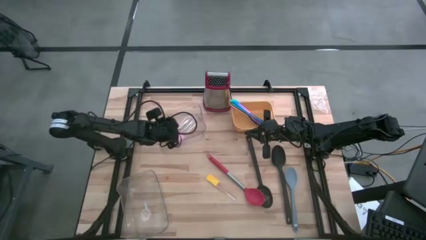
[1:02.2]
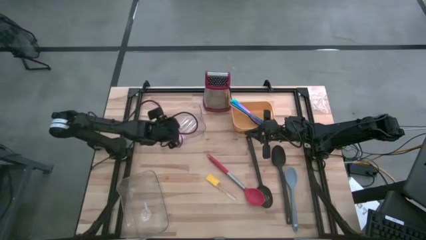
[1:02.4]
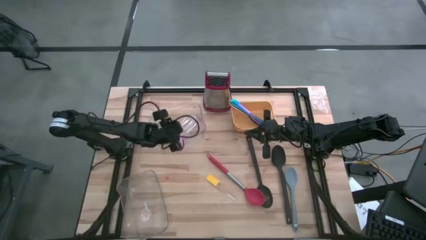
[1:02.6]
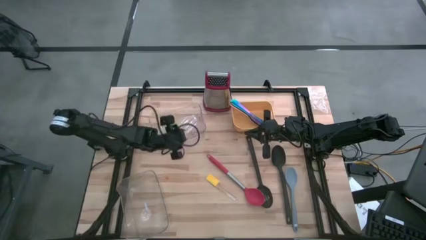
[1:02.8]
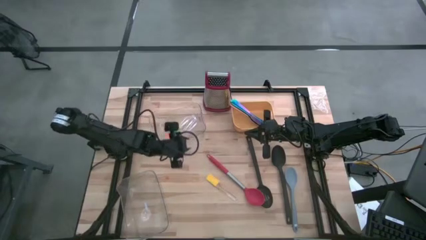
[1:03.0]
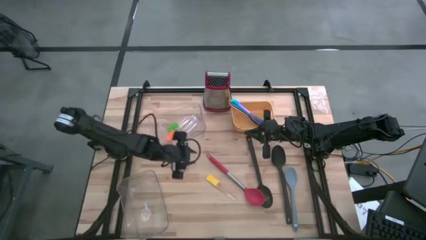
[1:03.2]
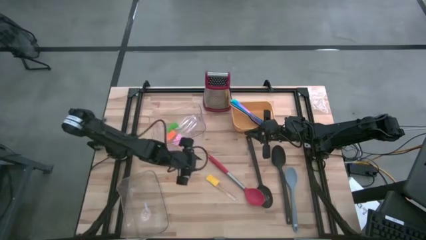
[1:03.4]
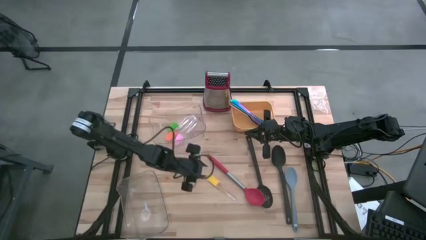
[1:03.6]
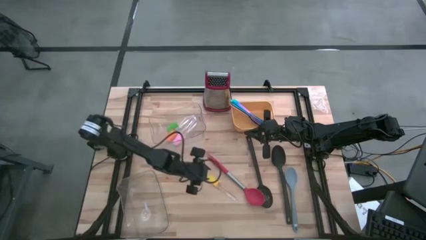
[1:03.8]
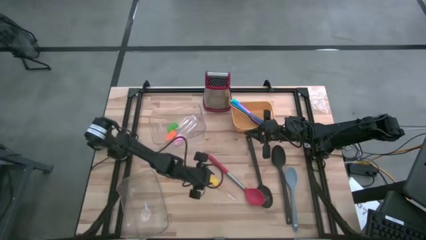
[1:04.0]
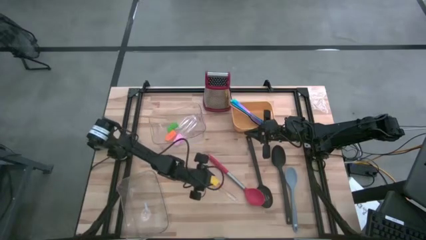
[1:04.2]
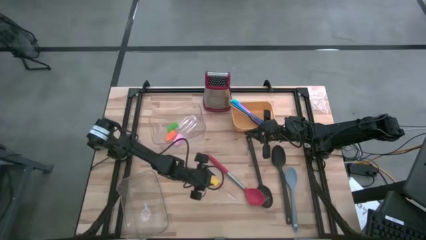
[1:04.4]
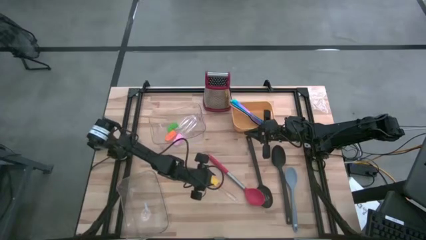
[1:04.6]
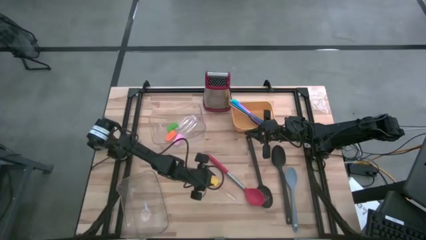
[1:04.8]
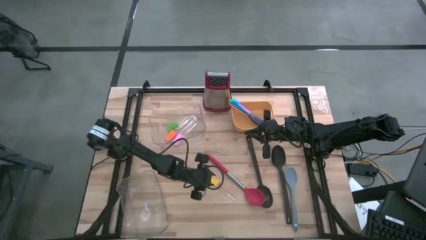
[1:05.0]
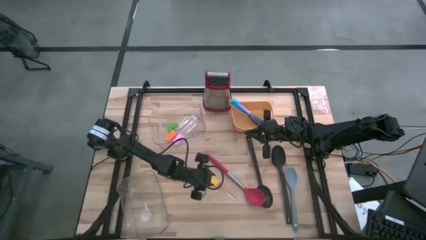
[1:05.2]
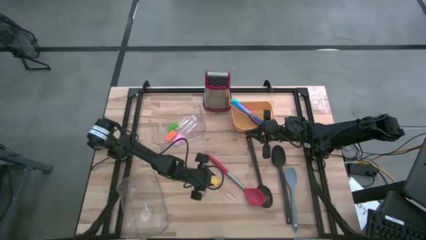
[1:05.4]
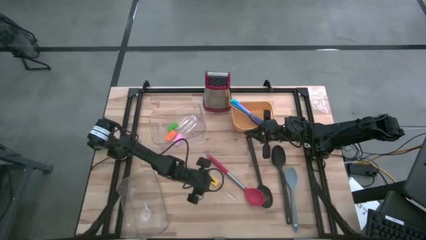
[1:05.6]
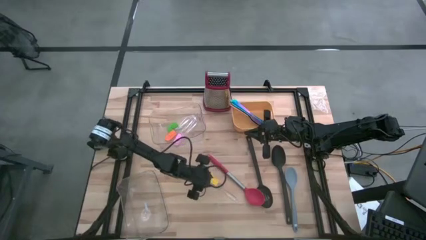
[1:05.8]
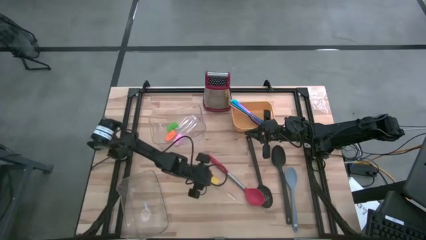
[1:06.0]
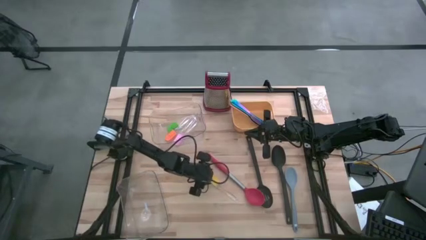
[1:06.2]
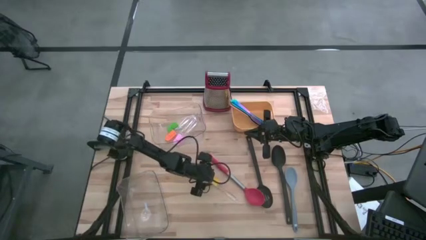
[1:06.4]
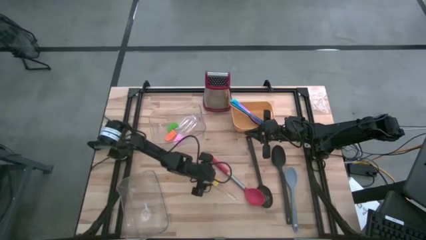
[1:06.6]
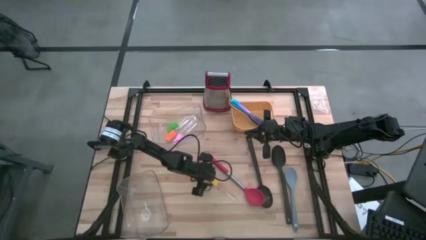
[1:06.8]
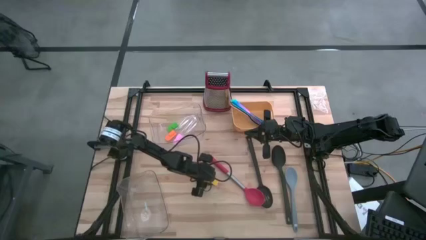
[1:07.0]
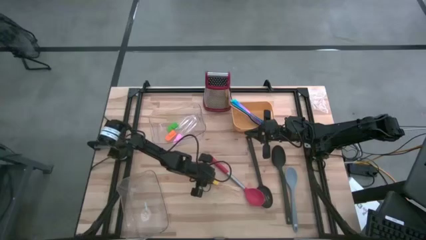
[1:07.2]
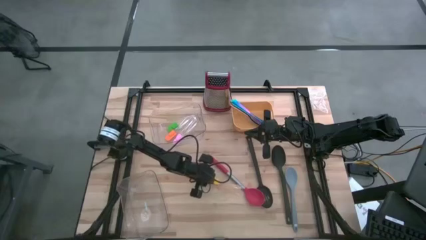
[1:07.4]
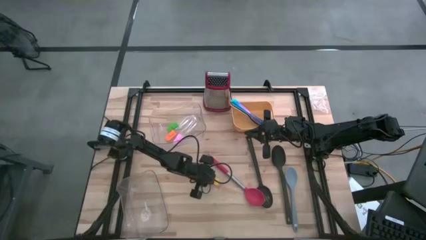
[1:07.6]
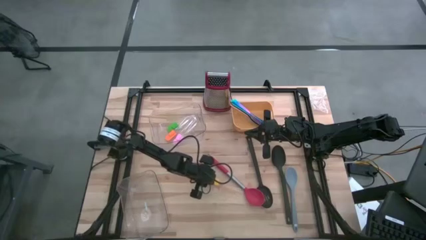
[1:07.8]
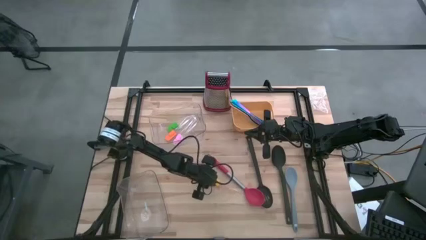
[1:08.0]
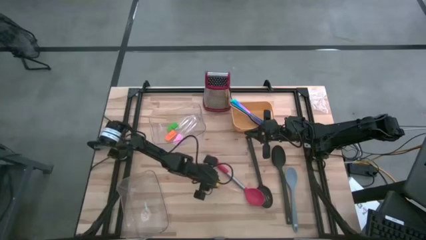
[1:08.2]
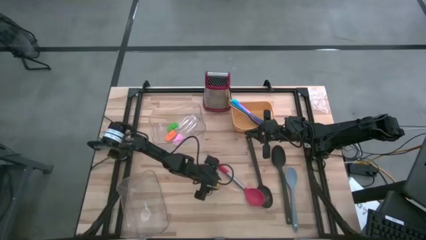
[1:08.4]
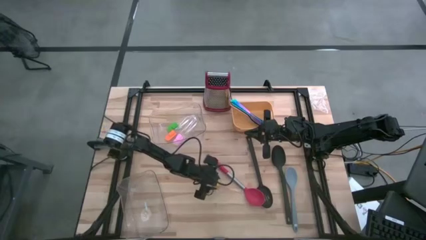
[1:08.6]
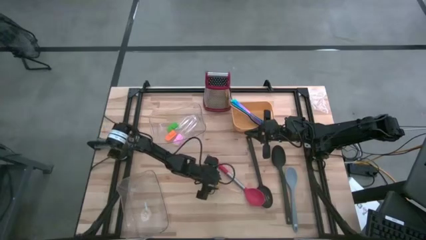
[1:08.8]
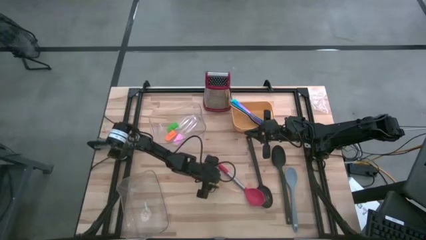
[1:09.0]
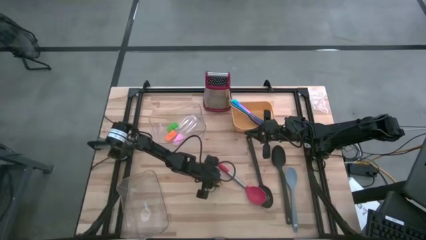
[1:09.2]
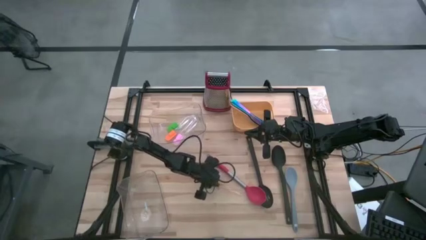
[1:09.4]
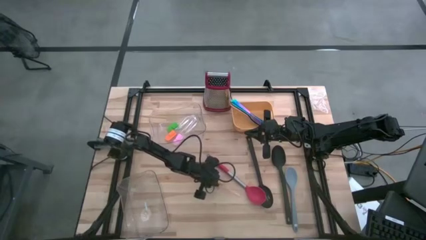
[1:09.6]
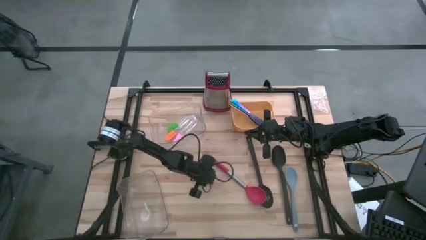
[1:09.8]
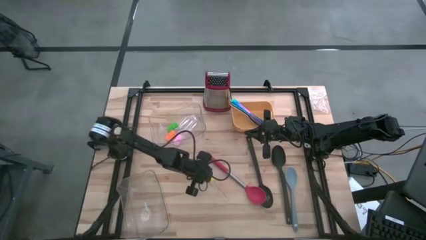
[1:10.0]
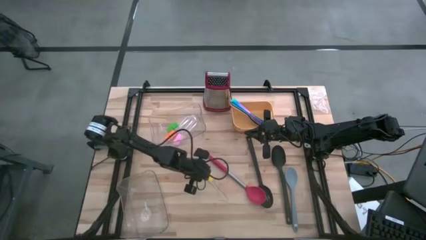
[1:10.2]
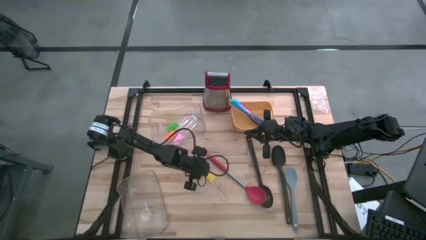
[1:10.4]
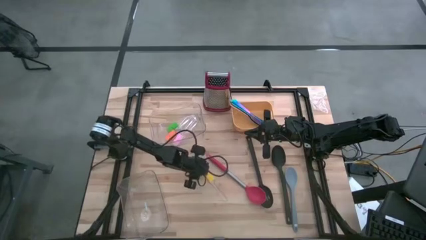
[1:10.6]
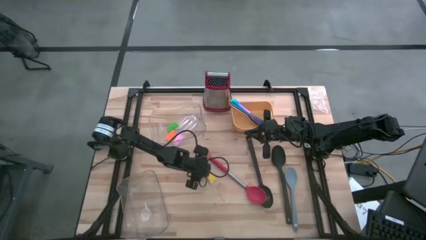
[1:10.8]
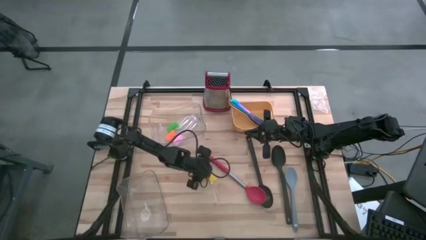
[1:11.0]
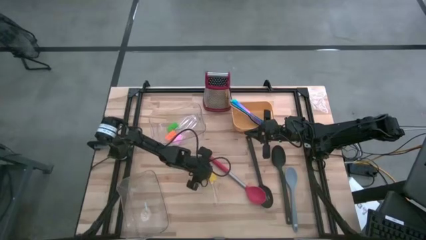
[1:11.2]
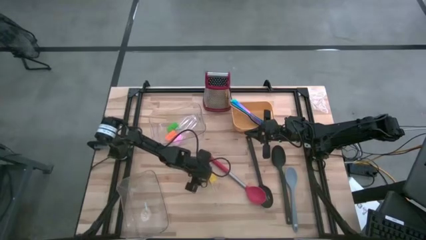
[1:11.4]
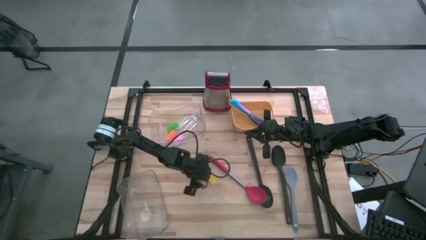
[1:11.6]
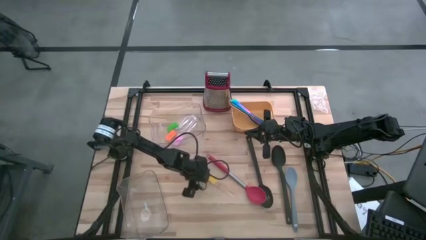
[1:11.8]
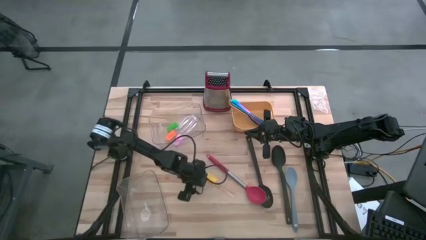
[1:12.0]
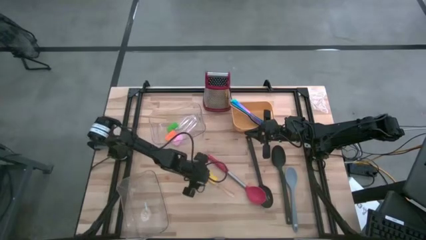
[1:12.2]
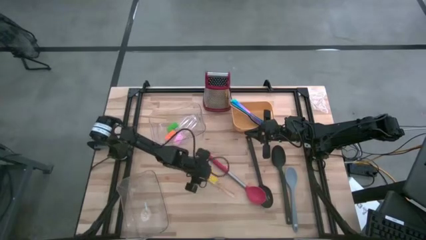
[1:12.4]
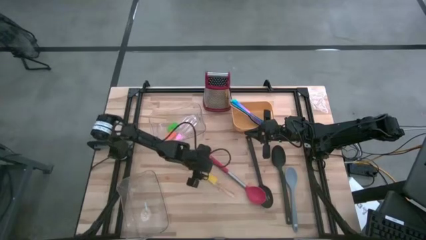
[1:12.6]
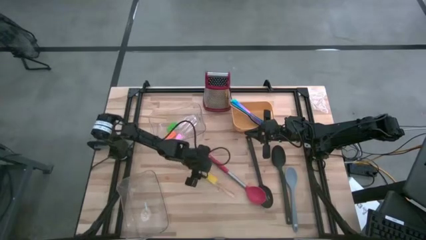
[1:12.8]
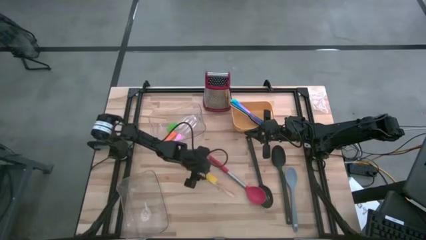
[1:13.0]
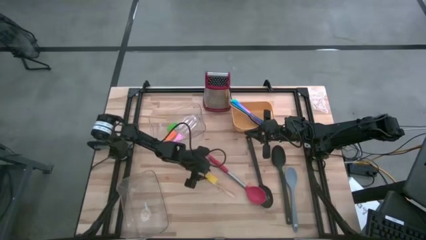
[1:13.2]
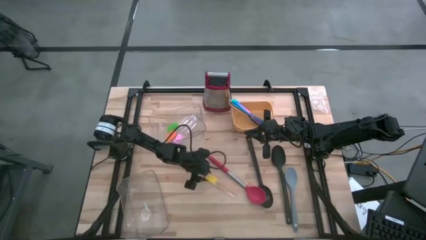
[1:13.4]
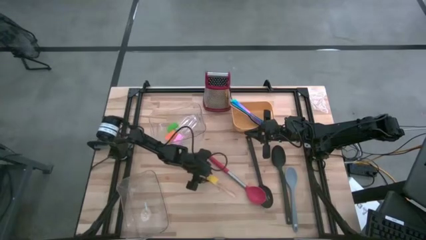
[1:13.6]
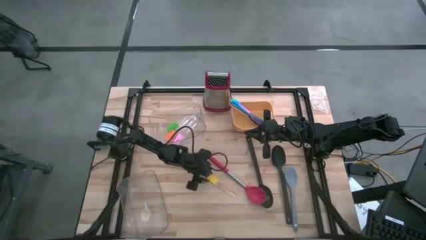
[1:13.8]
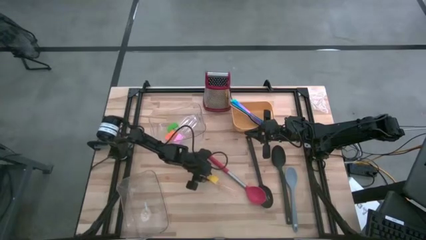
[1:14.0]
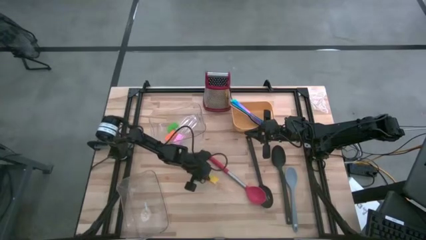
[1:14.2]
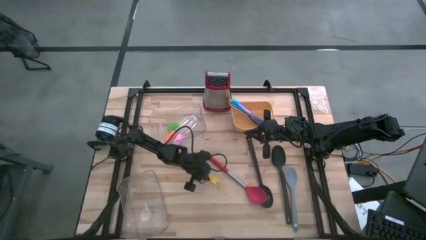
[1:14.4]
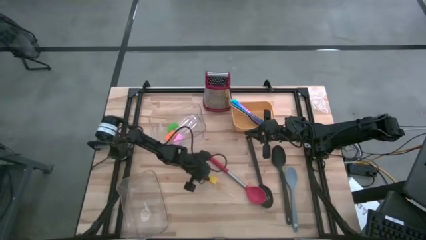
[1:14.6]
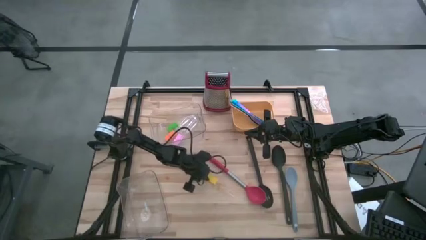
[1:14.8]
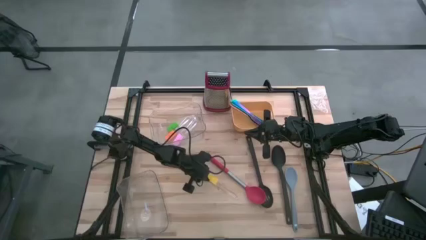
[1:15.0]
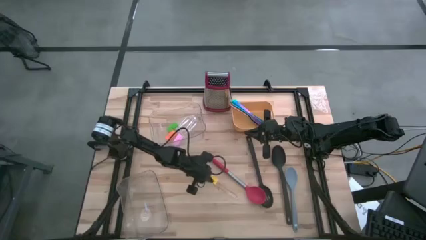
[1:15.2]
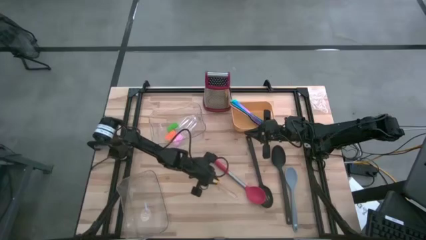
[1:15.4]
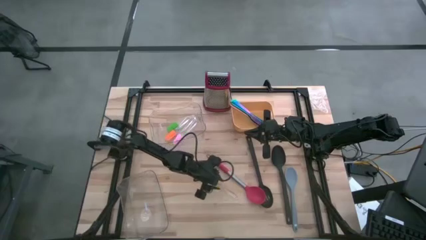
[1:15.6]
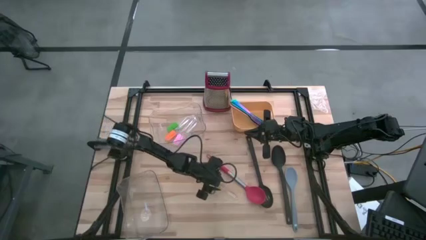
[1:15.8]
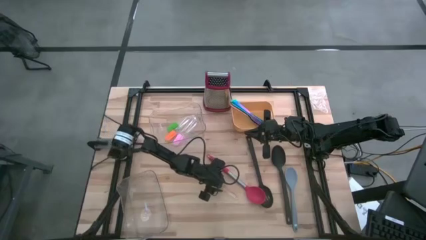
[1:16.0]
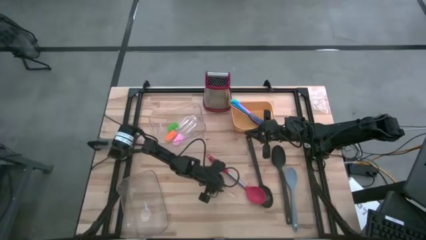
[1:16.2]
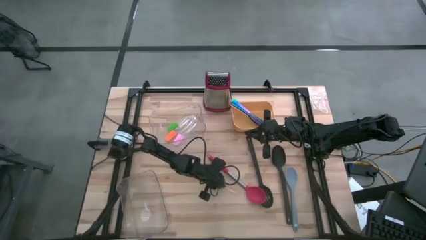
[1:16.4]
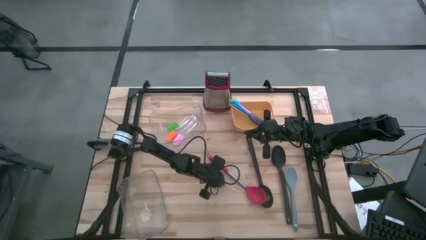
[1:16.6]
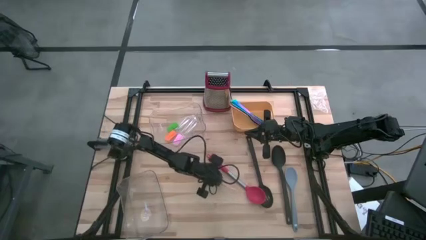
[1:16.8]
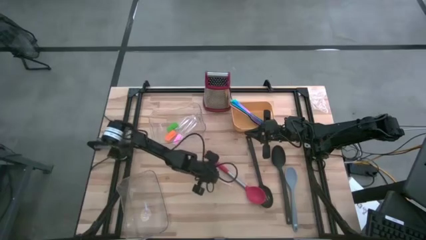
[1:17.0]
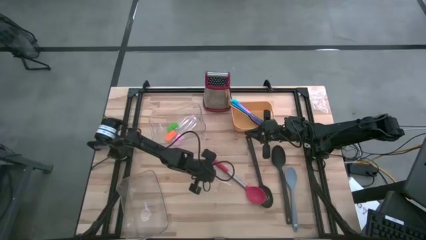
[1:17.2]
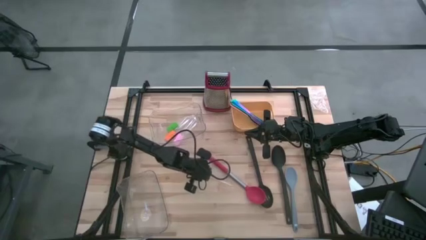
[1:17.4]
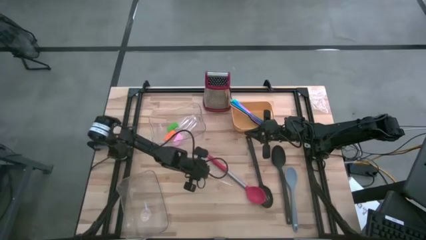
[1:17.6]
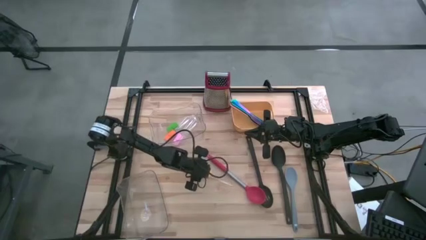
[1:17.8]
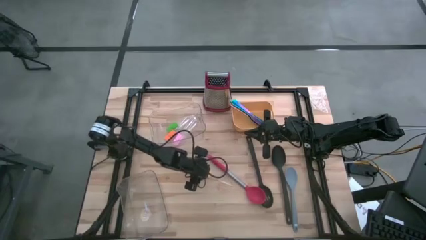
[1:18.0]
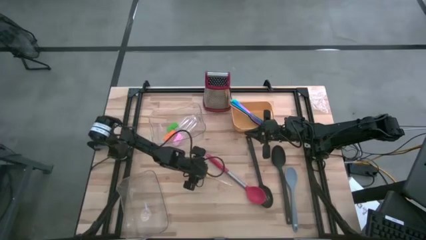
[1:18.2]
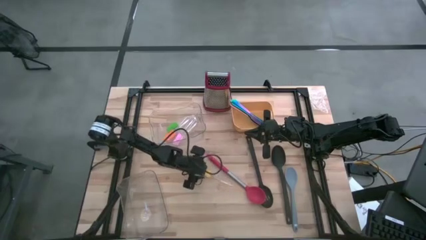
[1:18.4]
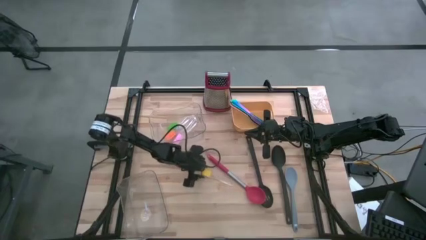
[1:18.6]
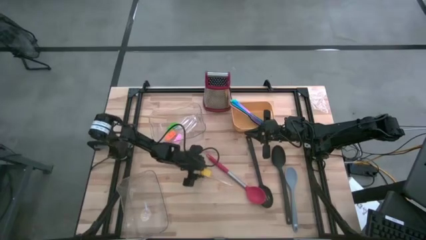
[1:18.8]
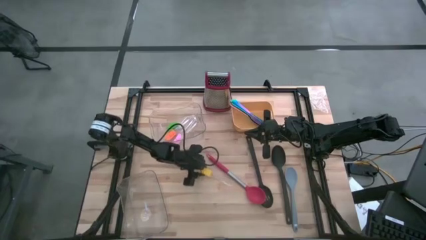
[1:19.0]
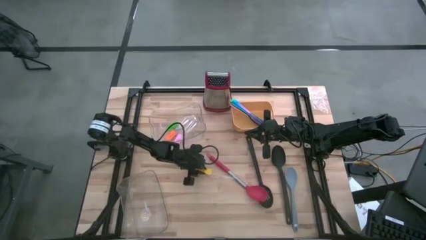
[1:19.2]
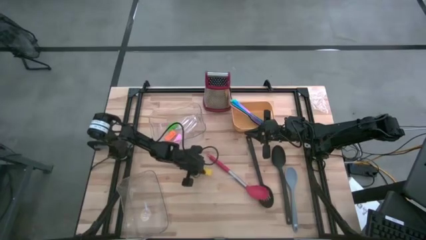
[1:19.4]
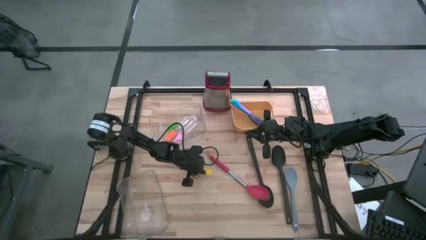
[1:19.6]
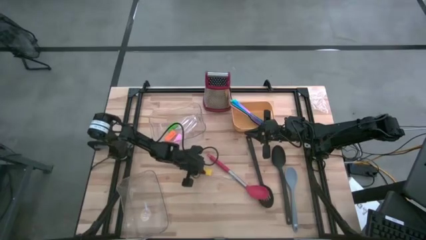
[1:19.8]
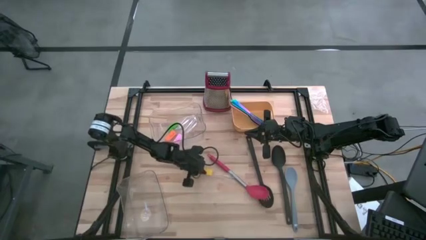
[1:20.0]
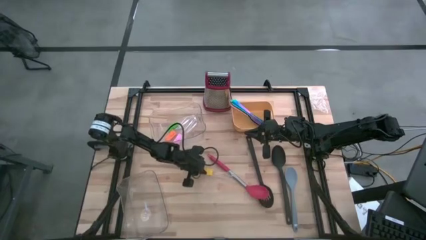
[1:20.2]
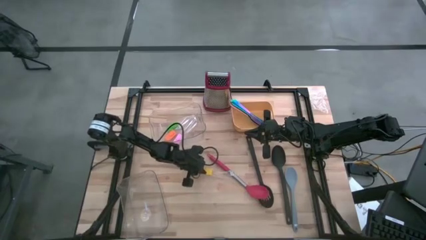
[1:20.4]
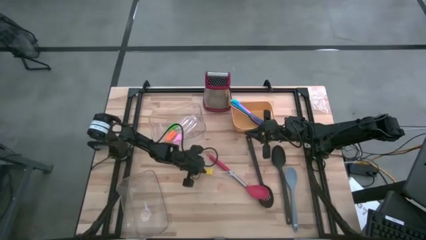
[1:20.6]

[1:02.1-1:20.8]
Task: Pick & Place Kitchen Items
Put the yellow spatula into the top transparent bin
